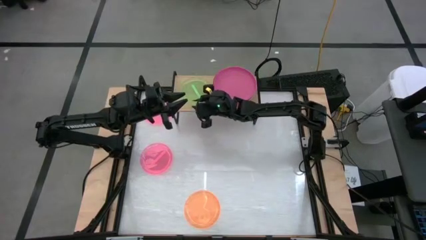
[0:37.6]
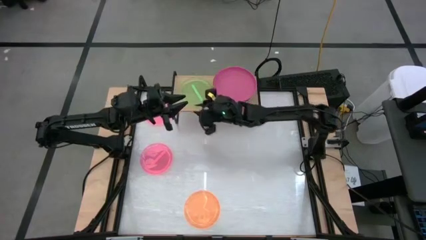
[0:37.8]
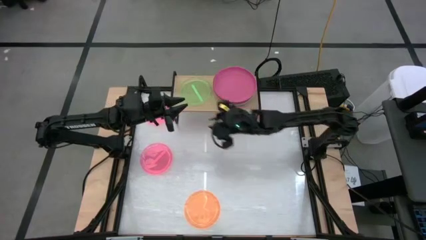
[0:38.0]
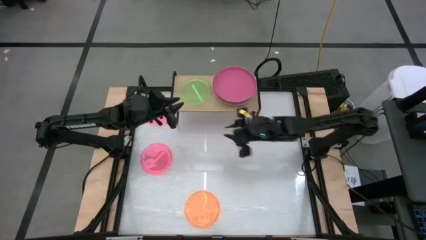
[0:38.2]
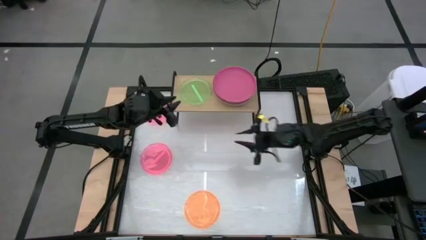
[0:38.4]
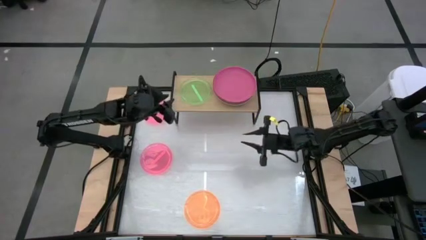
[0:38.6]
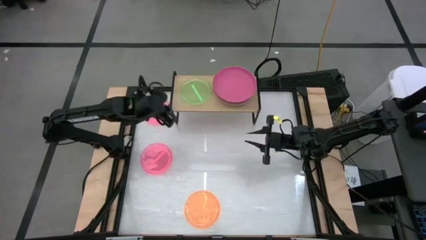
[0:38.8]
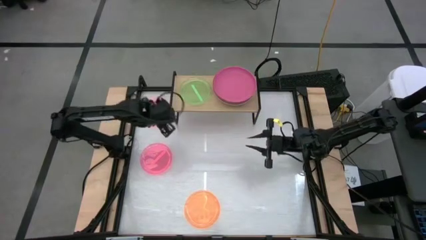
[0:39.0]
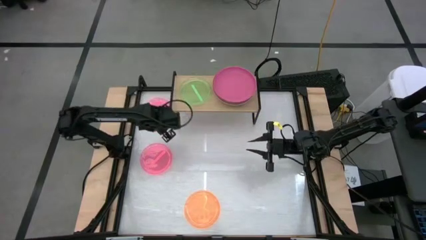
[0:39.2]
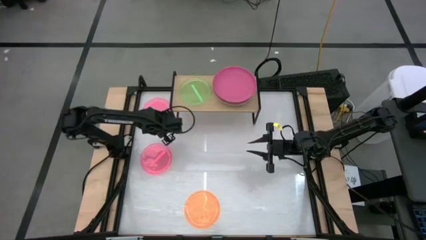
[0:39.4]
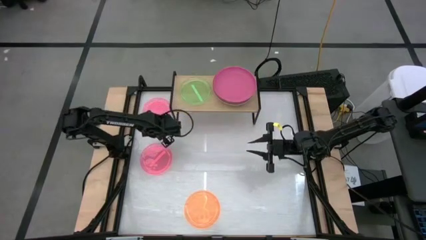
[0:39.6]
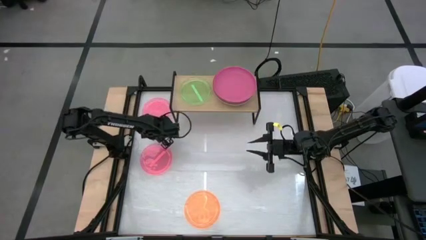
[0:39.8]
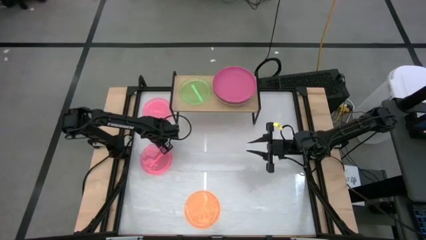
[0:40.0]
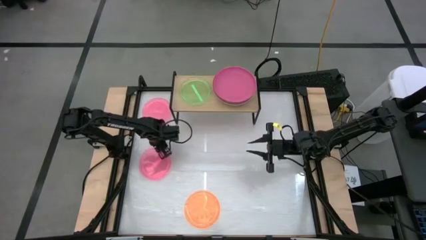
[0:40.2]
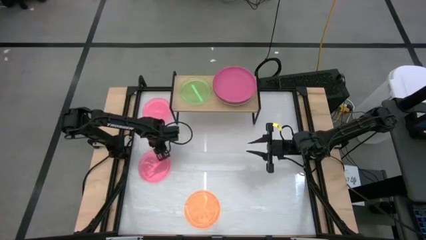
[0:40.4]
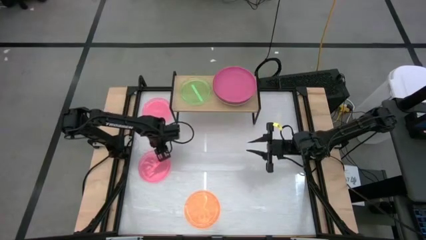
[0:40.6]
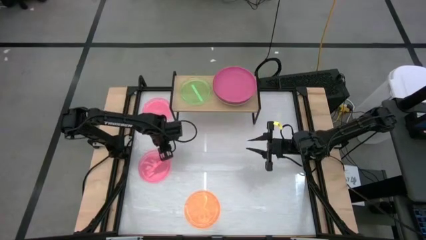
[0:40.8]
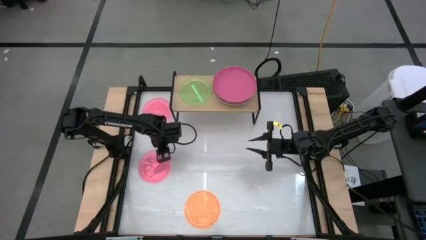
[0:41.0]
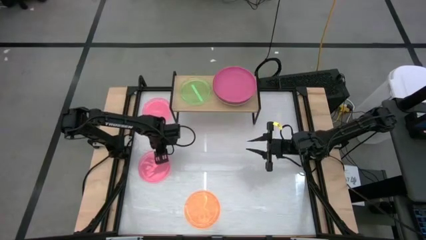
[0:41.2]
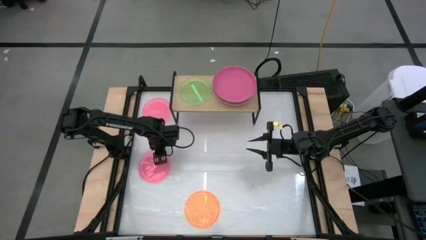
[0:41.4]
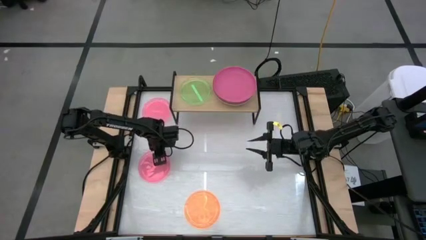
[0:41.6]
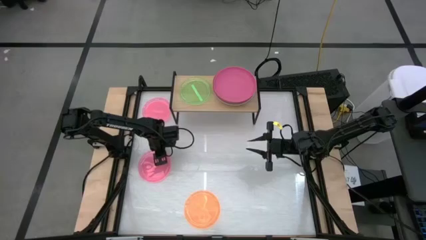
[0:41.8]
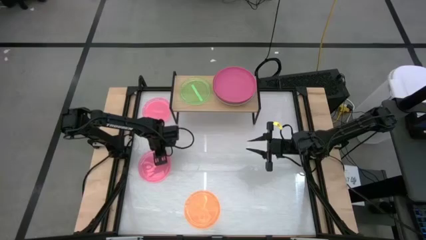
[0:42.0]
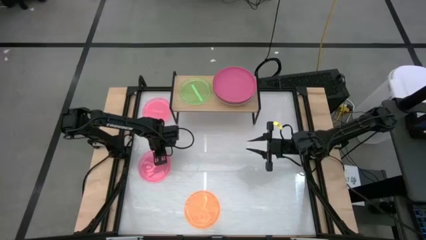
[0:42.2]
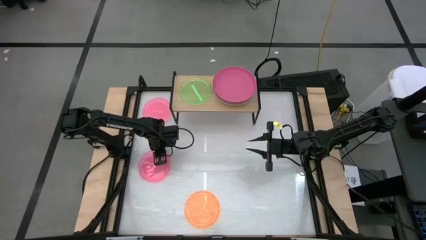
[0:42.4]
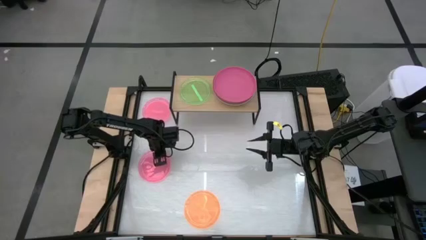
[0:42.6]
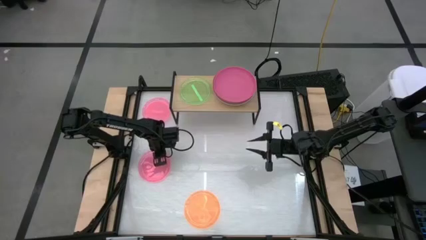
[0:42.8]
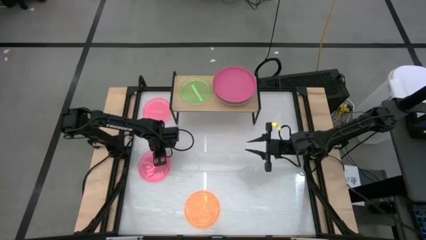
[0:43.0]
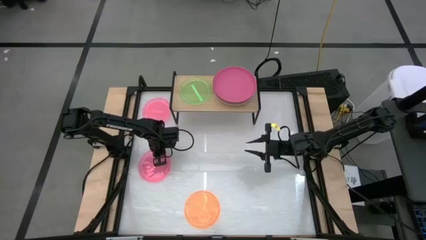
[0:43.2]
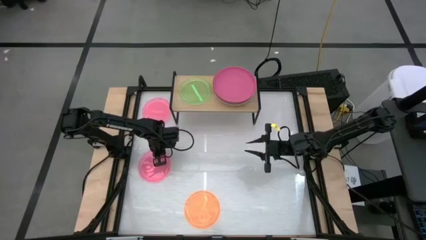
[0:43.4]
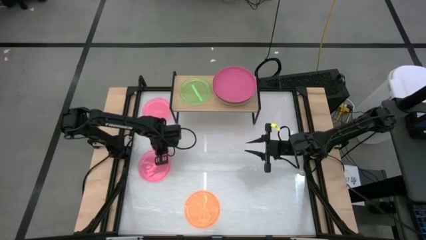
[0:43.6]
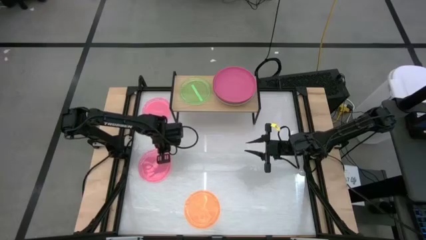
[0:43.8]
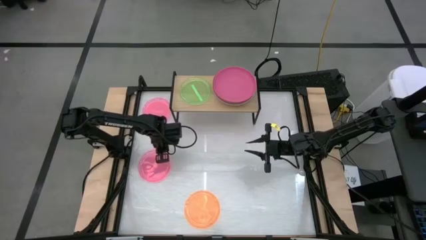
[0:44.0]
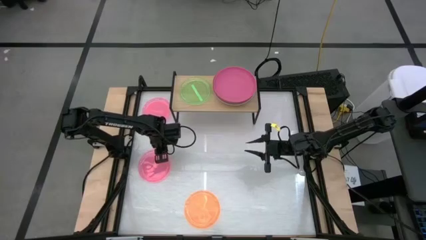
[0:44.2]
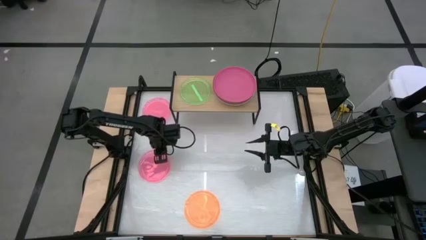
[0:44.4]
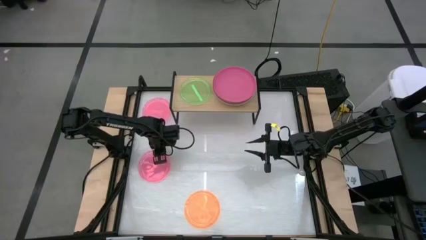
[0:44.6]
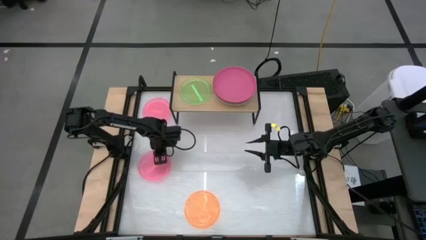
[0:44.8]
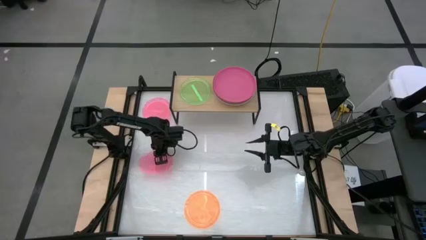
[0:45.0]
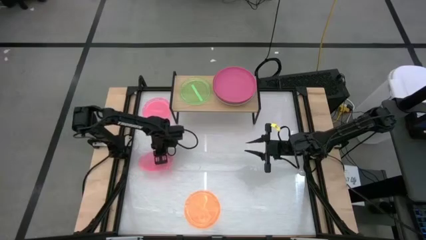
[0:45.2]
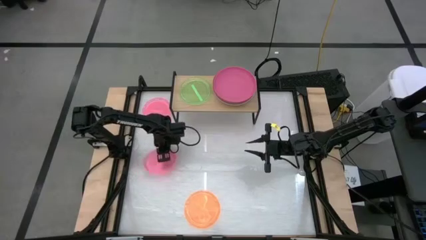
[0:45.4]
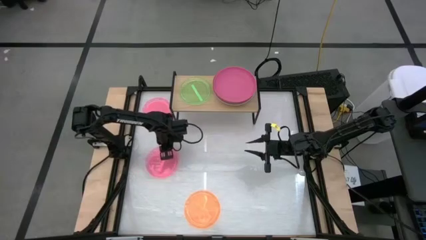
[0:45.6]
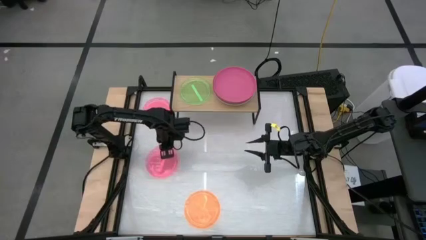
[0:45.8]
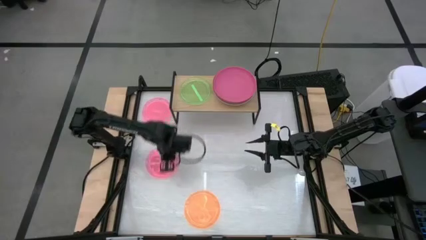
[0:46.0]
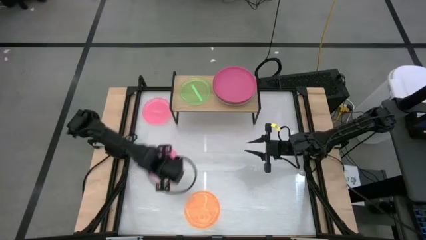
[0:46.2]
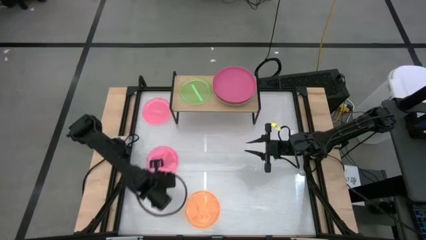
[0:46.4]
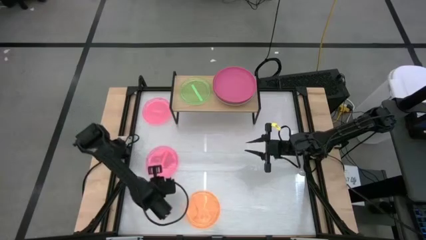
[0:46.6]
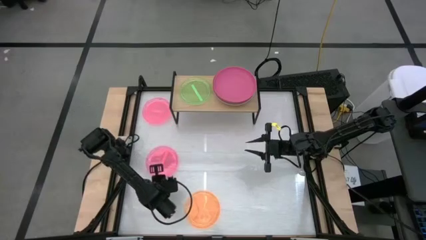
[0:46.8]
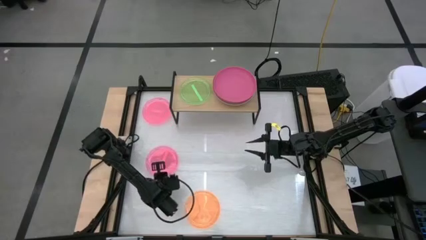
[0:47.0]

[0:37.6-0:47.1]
Task: Place and stack plates onto a shelf
Stack the bottom pink transparent plate on top of the green transparent plate on the shelf

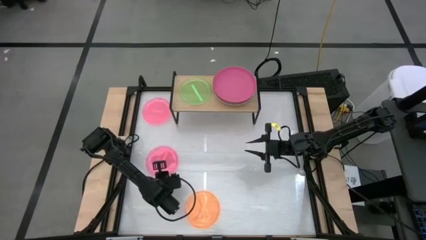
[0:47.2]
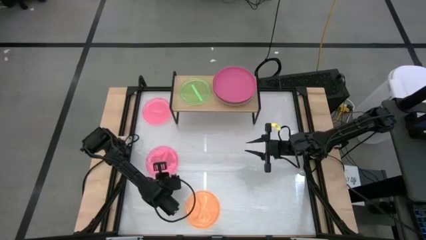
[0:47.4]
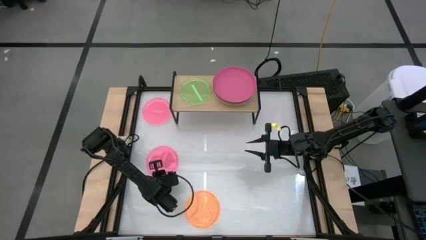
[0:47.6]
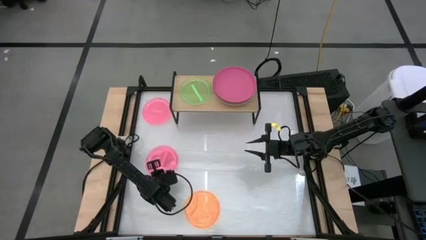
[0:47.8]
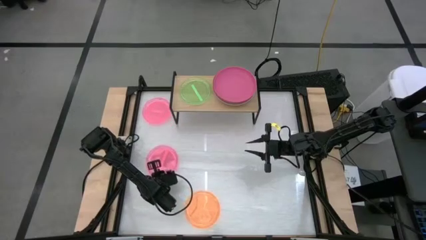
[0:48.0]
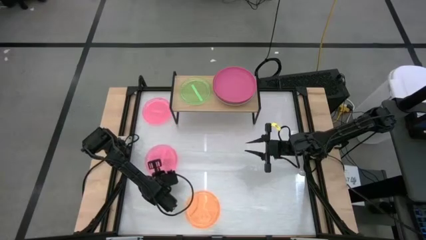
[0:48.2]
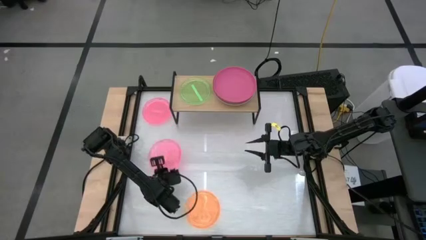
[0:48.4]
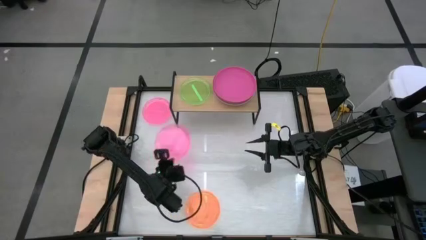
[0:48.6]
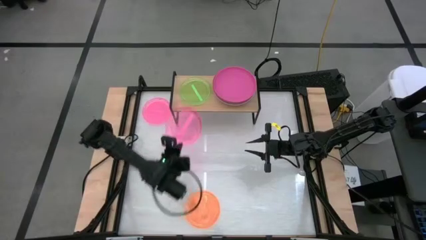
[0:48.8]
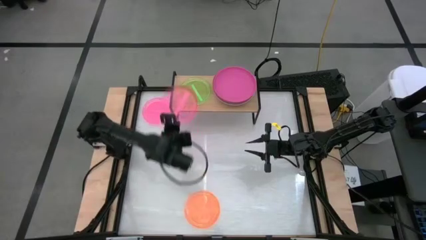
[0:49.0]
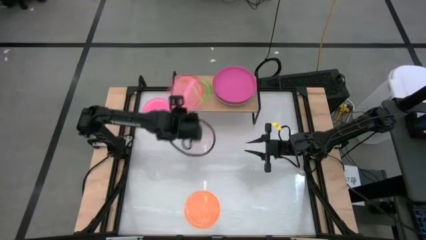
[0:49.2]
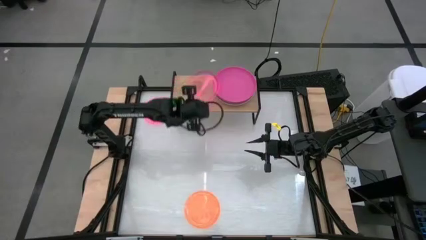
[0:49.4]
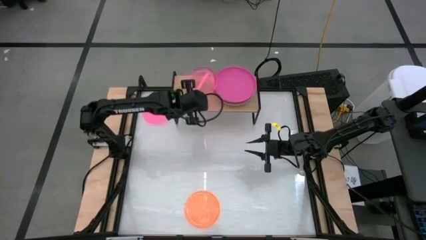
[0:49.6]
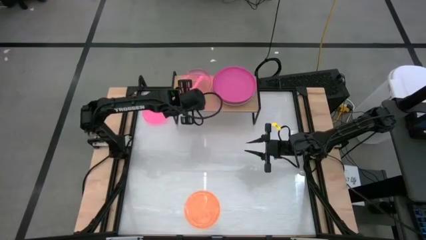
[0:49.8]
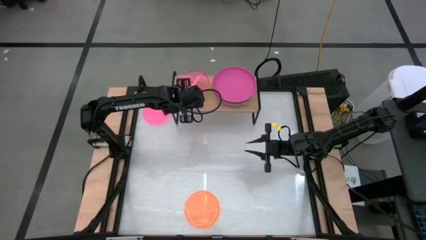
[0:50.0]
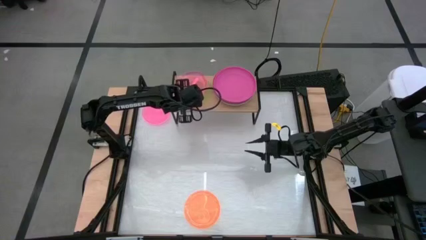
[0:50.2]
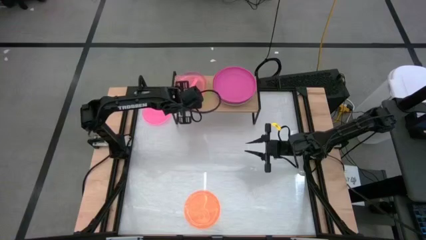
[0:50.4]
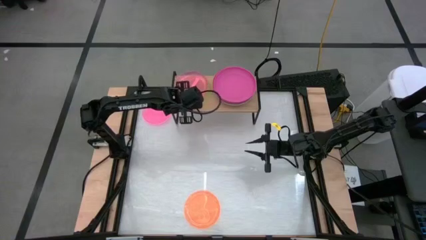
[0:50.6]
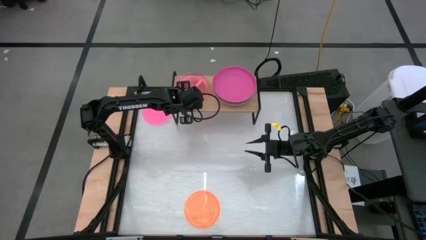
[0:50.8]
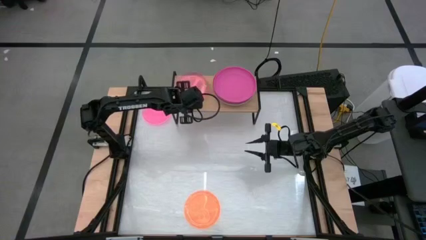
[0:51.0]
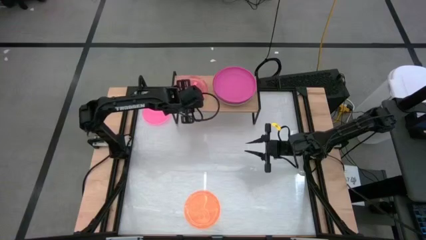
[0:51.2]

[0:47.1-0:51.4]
Stack the bottom pink transparent plate on top of the green transparent plate on the shelf

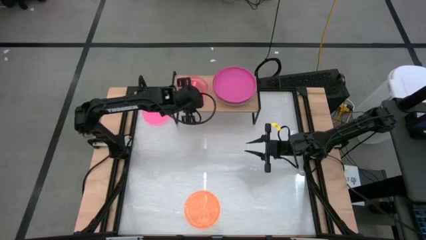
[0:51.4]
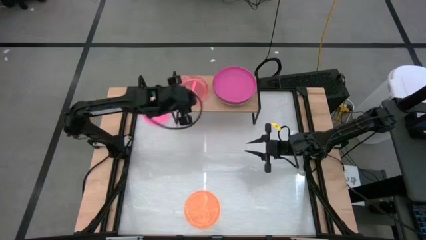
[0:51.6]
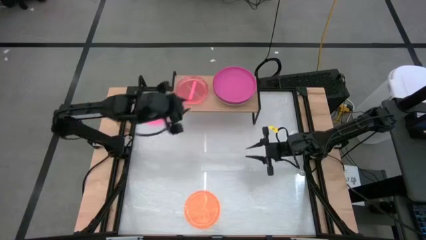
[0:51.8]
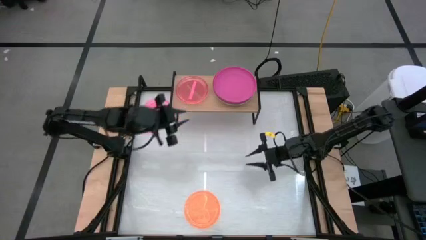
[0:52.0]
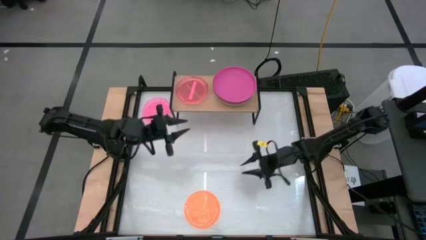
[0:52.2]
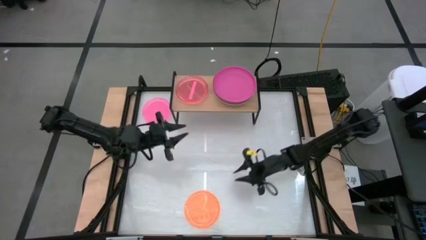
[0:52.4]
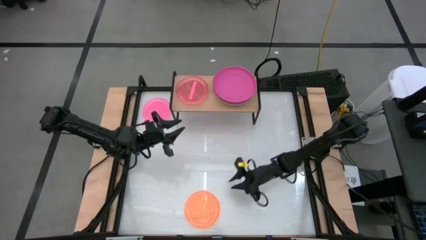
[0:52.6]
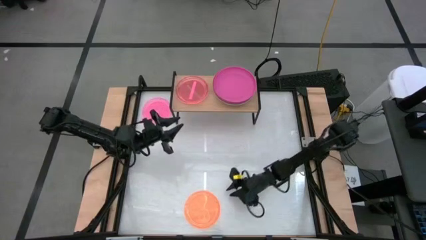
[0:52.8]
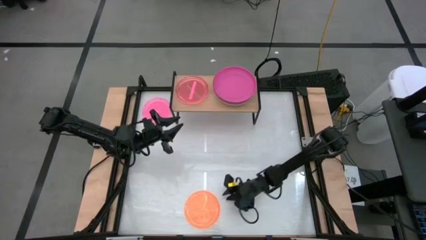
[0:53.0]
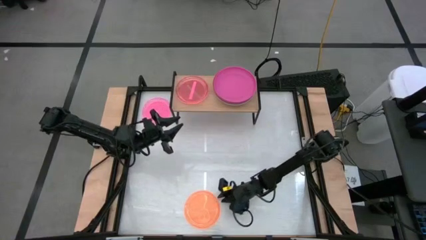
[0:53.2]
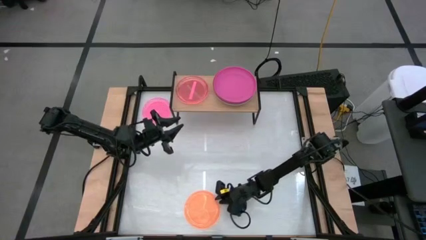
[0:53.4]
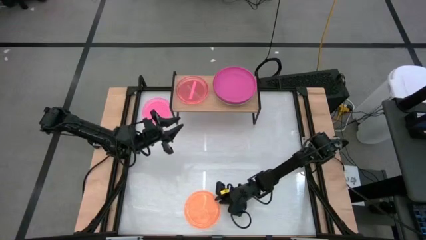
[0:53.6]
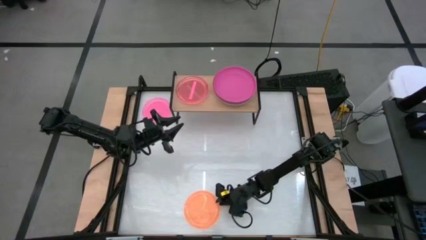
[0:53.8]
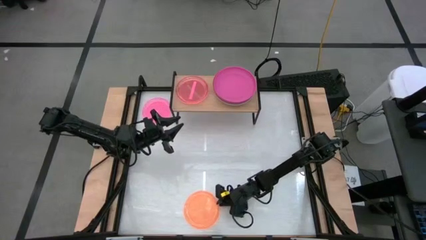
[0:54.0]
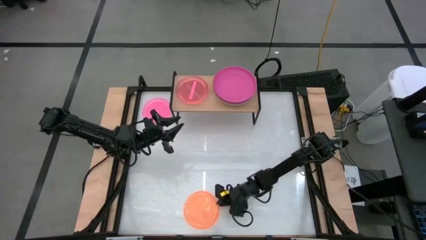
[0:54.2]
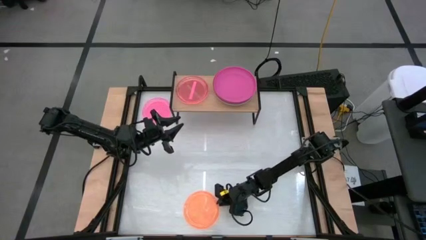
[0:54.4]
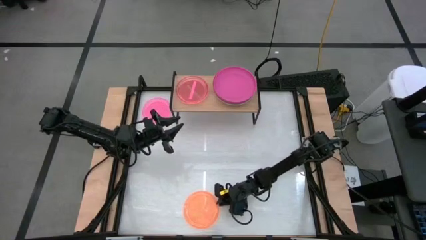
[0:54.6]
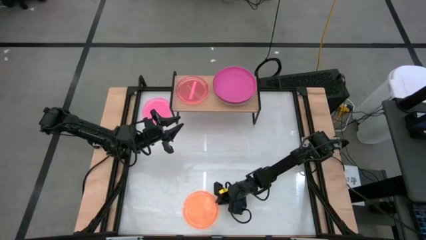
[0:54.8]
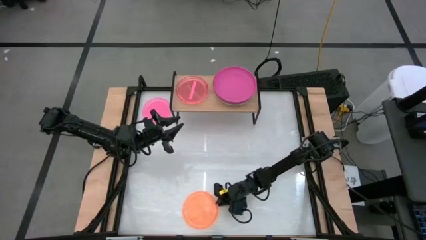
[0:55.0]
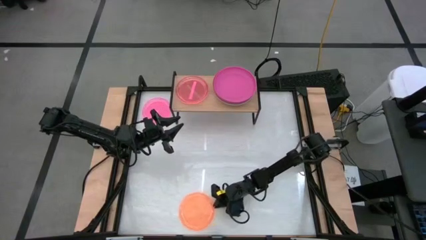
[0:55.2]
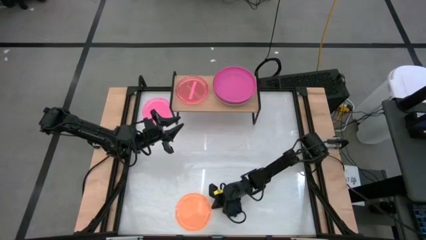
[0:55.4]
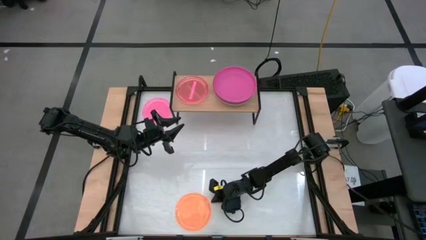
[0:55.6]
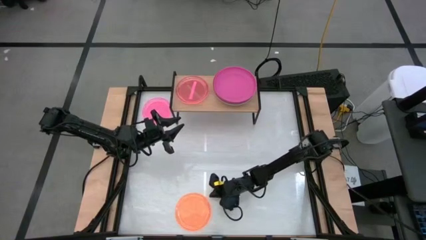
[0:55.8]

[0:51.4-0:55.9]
Stack the orange transparent plate on top of the pink transparent plate on the shelf
